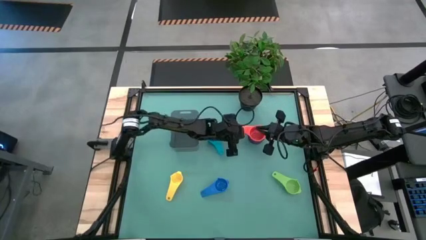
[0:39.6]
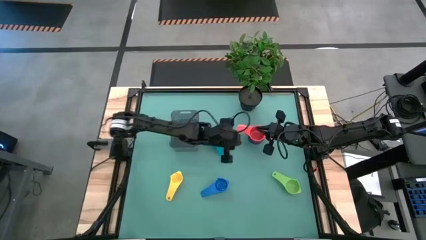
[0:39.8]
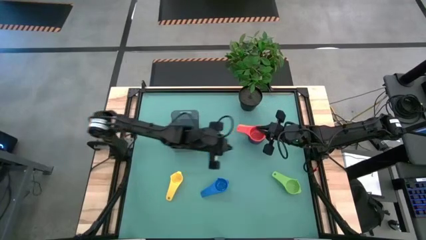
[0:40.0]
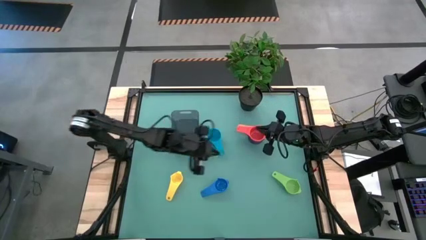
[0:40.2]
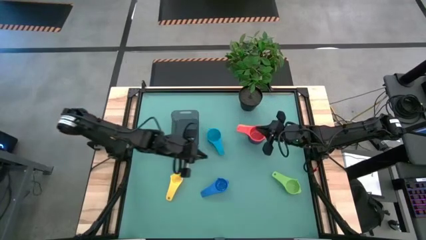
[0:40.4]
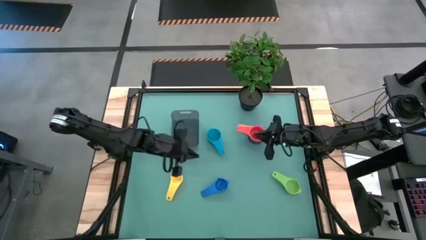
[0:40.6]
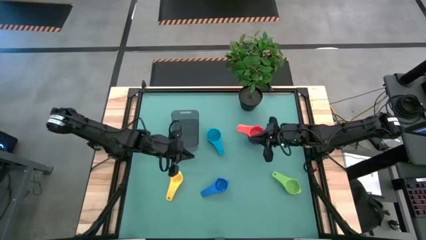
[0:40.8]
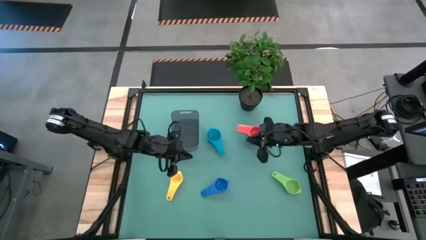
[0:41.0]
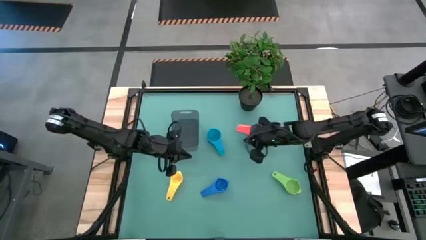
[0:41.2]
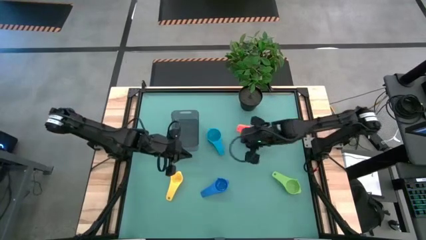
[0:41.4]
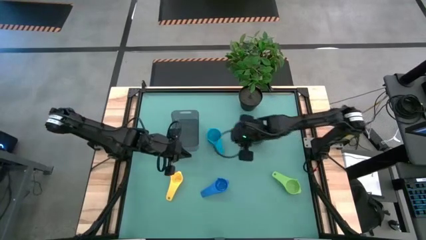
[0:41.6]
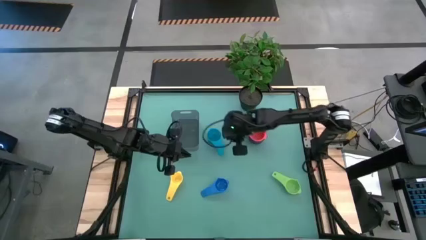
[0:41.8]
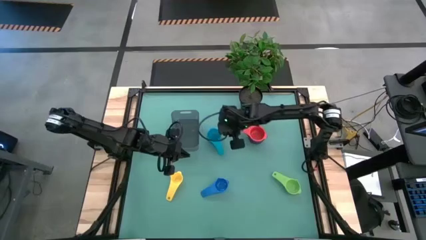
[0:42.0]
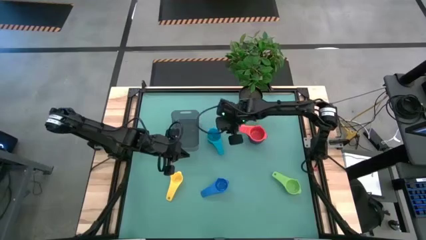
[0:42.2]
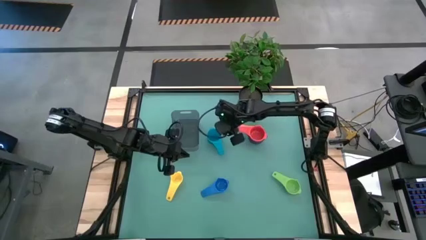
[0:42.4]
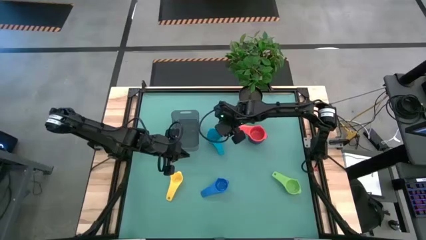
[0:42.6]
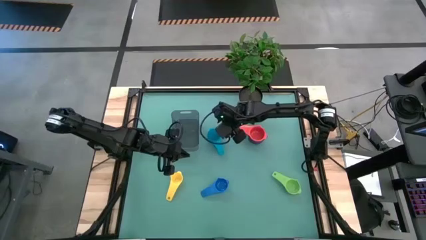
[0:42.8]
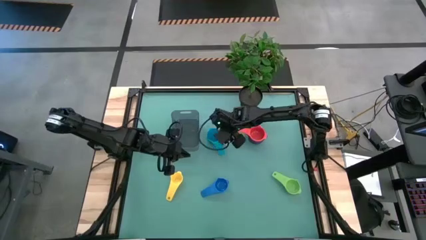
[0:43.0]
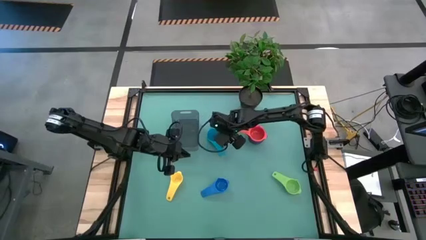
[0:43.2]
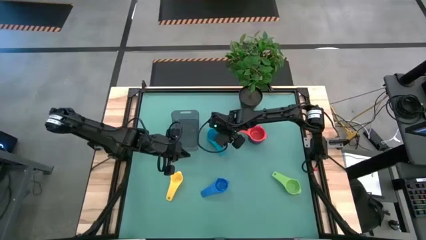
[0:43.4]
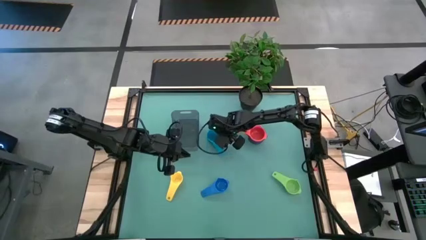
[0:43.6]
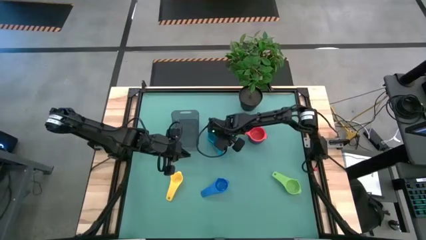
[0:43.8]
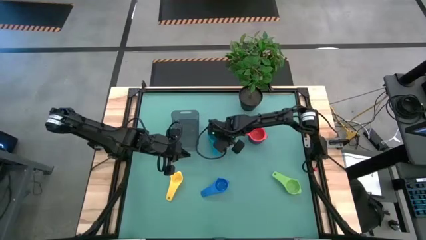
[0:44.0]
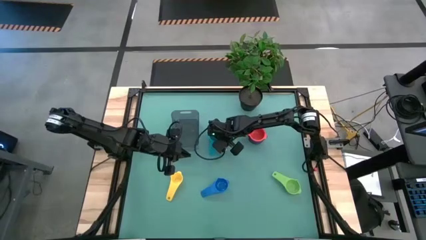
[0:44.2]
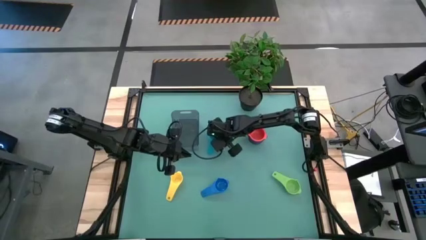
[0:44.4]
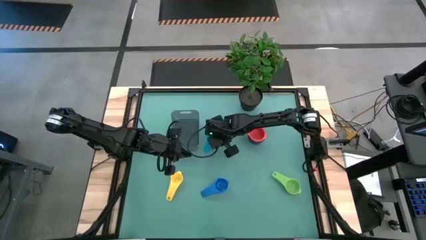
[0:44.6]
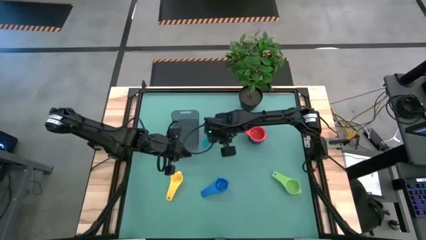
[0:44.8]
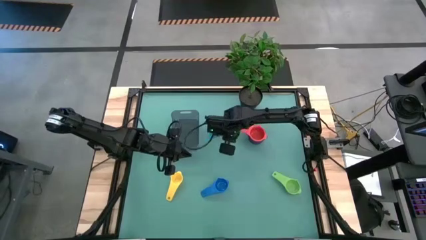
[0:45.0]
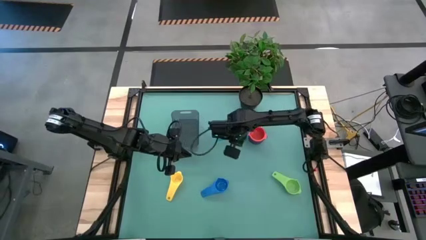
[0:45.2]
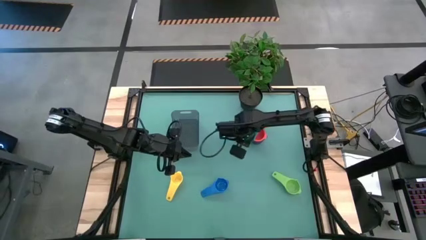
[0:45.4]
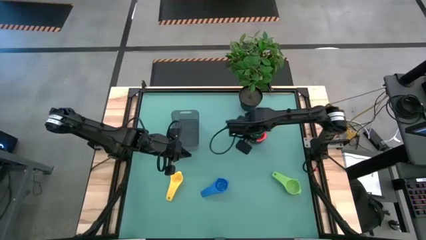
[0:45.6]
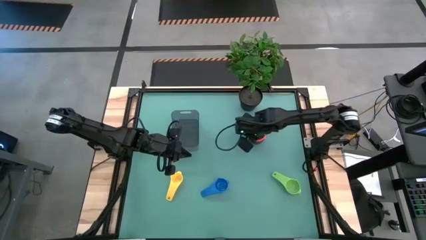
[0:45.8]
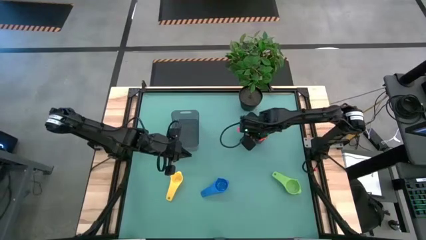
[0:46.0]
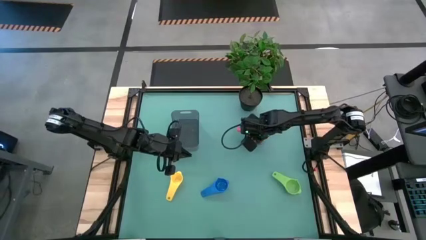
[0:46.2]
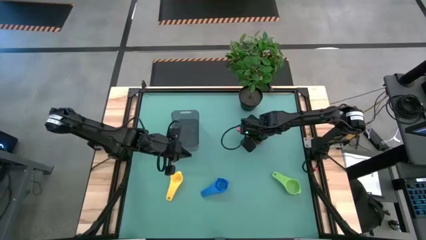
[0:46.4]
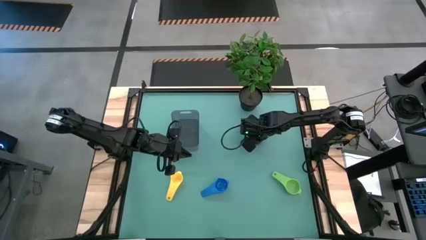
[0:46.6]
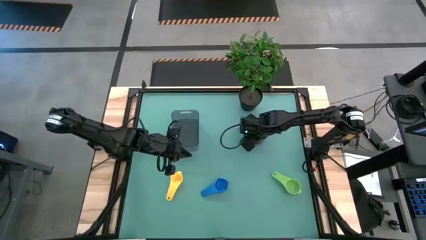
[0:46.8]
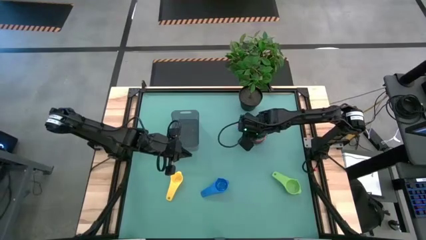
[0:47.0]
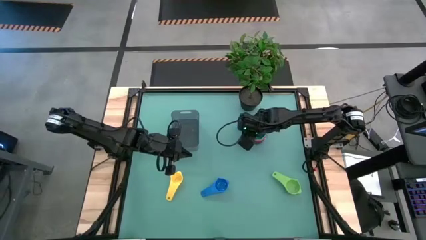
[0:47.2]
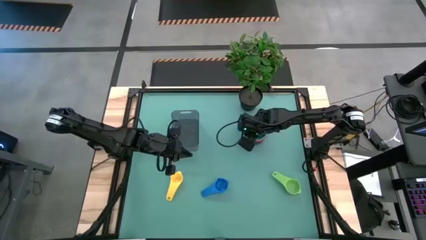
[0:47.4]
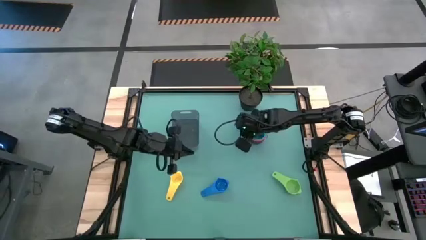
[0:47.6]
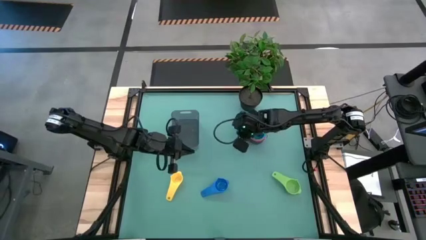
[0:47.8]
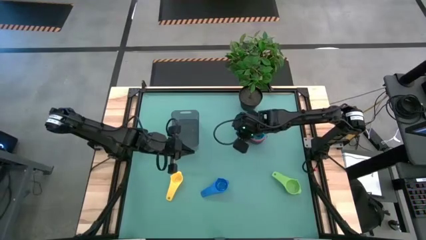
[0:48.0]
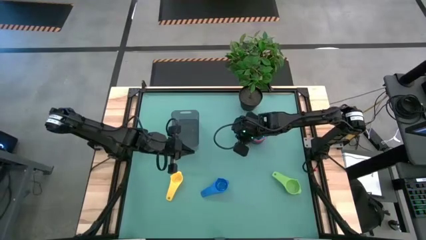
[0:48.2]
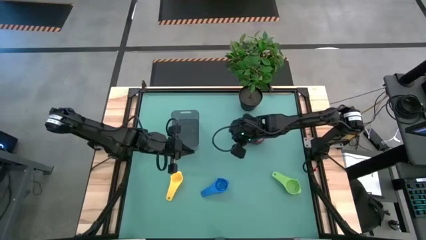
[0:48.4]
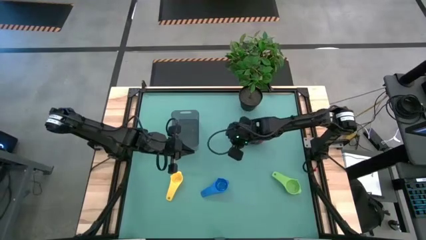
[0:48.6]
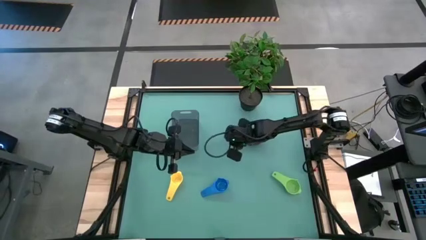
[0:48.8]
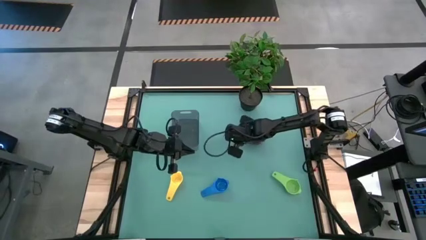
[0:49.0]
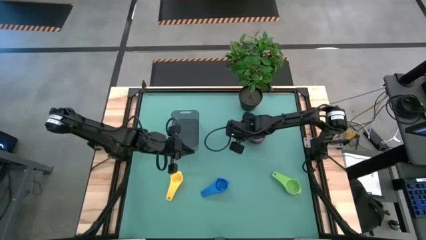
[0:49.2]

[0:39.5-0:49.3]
Task: Nest measuring cups in basket
Stack the light blue measuring cup on top of the red measuring cup

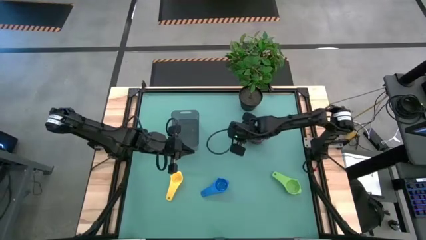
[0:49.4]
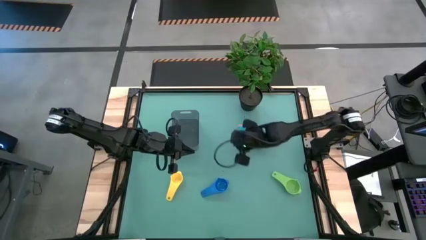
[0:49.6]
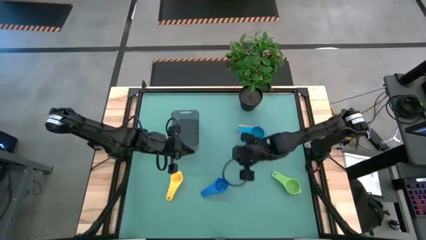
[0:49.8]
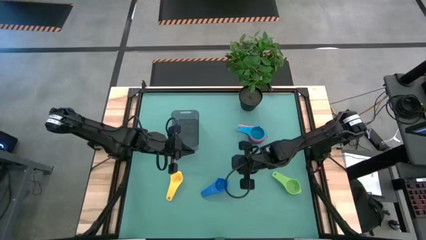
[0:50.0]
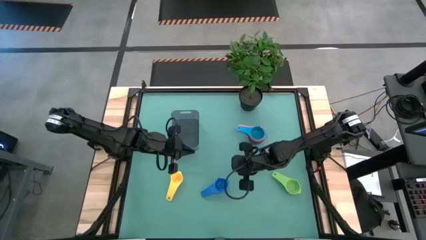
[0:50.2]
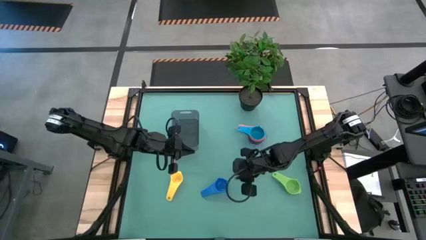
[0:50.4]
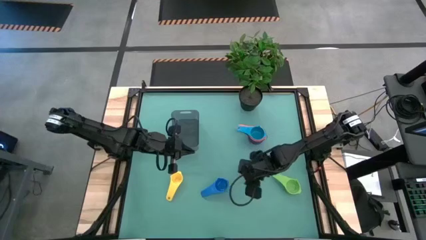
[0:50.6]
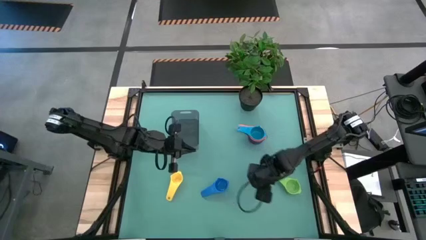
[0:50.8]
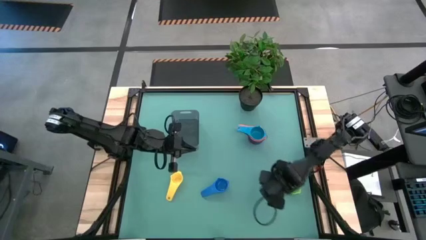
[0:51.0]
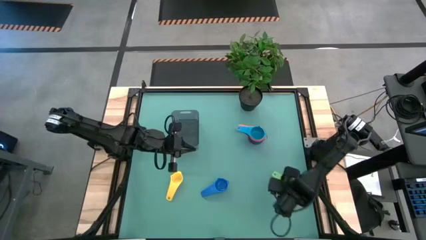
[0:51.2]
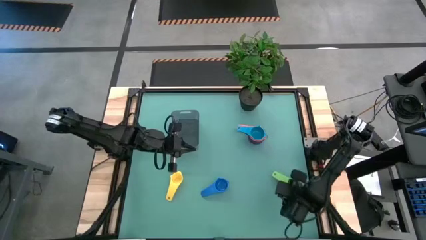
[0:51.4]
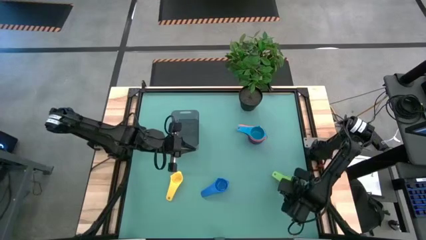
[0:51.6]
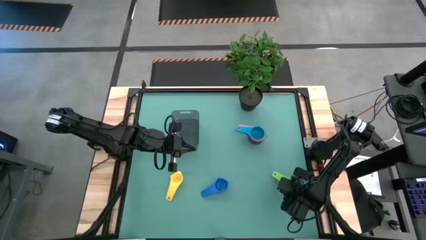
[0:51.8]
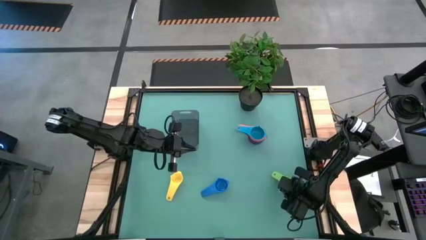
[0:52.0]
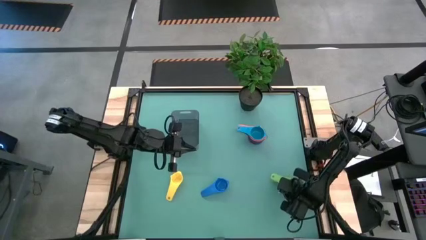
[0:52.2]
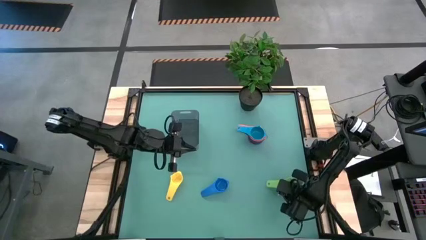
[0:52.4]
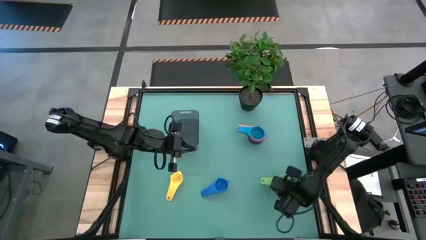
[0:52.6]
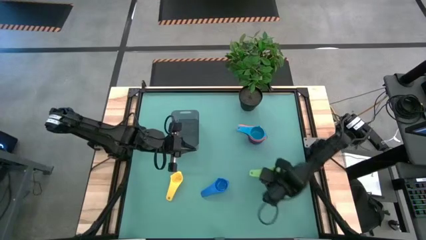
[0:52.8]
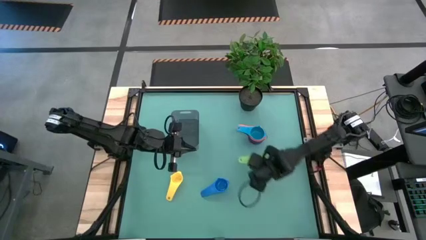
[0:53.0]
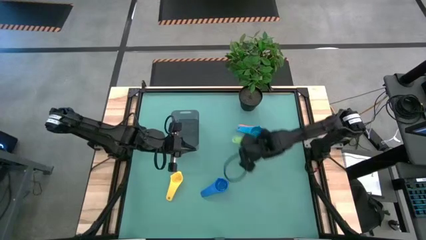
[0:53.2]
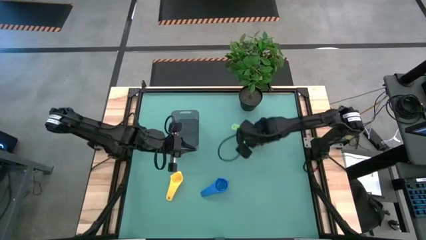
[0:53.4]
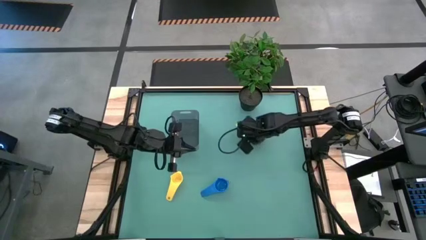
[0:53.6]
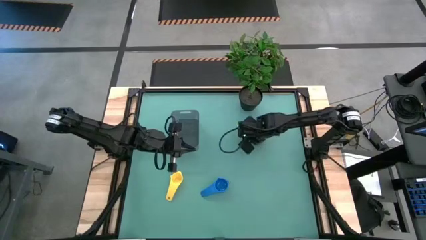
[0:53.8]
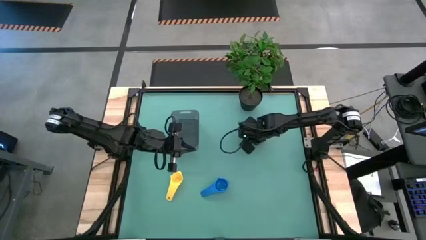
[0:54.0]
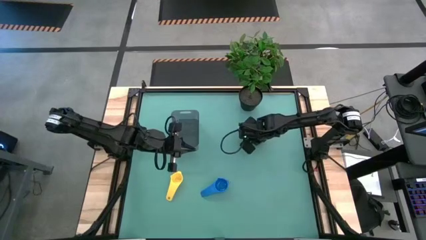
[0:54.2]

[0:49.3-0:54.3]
Stack the light green measuring cup on top of the light blue measuring cup
